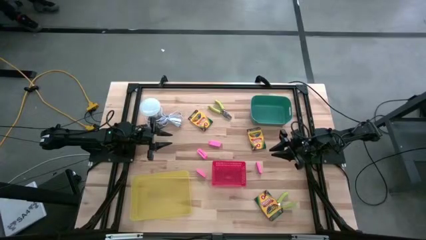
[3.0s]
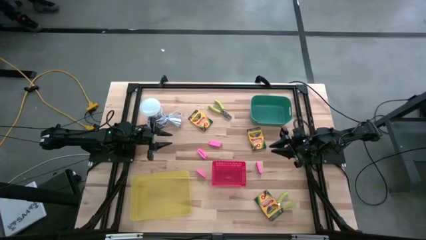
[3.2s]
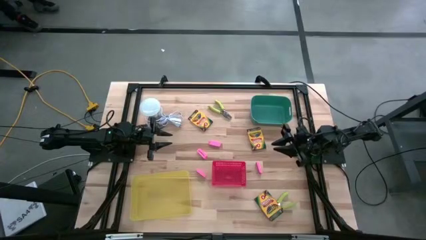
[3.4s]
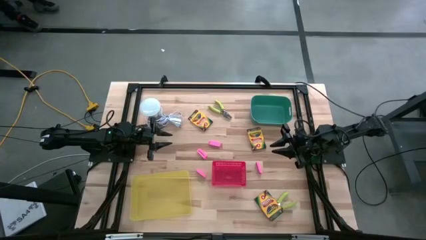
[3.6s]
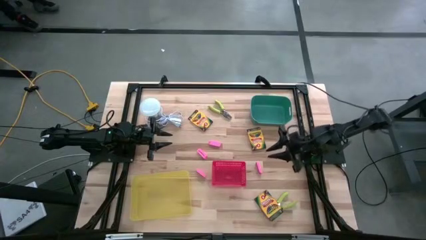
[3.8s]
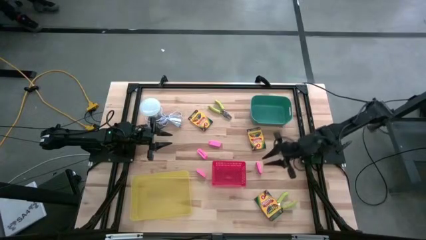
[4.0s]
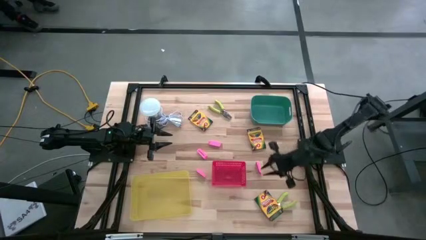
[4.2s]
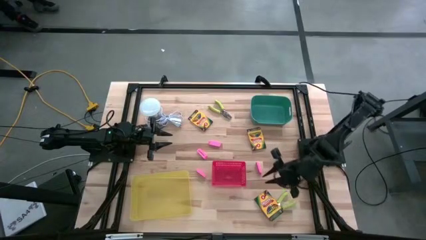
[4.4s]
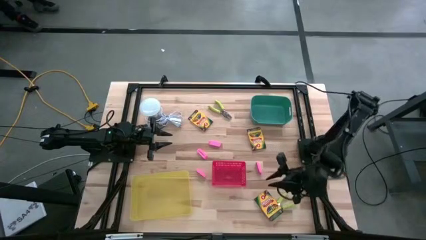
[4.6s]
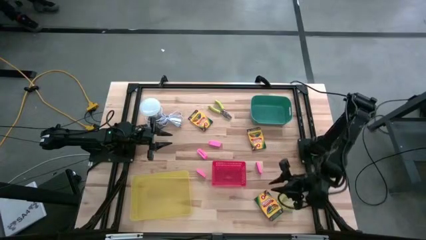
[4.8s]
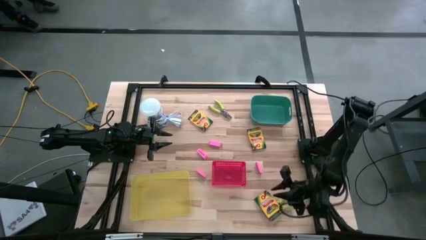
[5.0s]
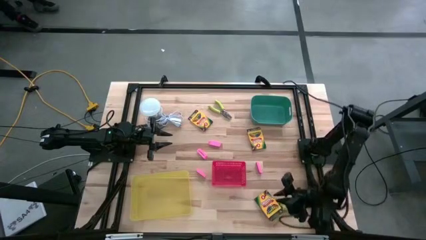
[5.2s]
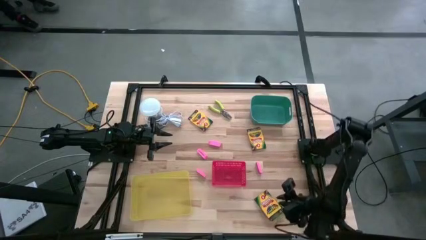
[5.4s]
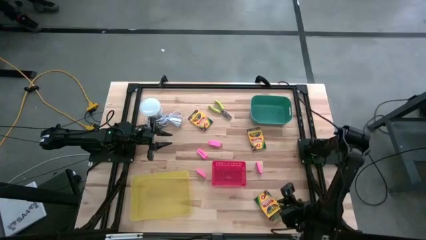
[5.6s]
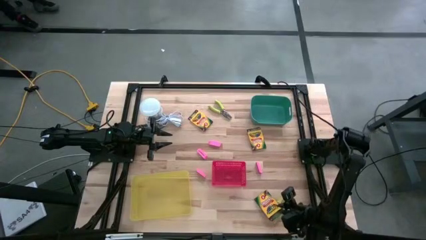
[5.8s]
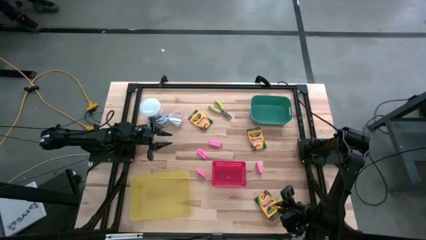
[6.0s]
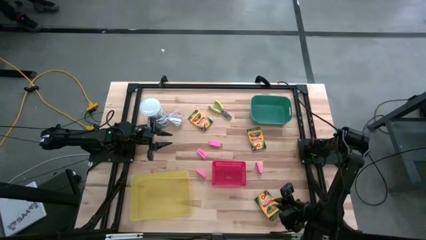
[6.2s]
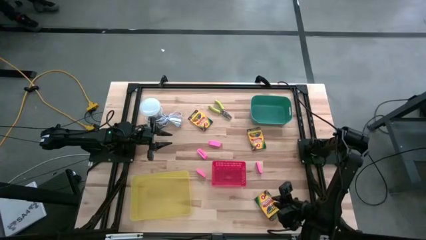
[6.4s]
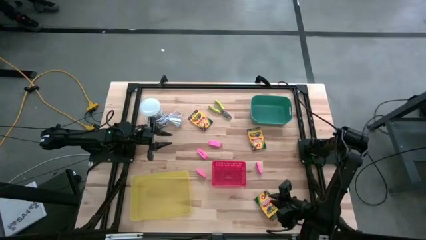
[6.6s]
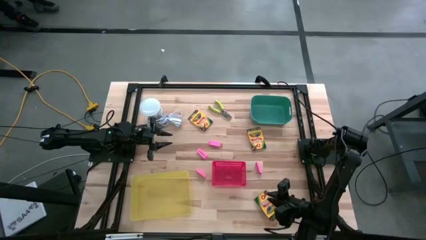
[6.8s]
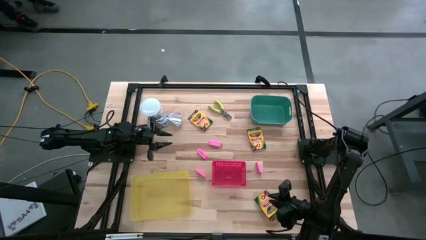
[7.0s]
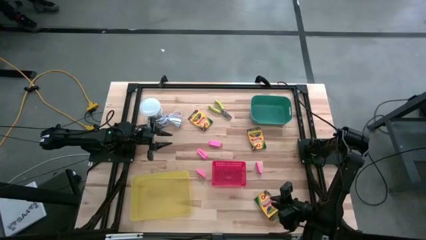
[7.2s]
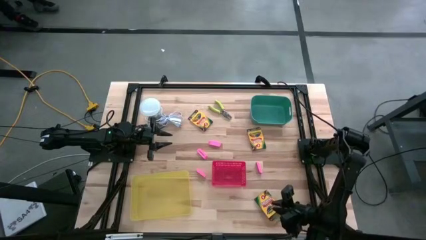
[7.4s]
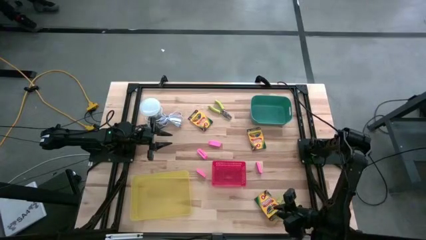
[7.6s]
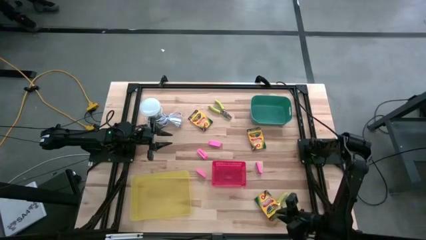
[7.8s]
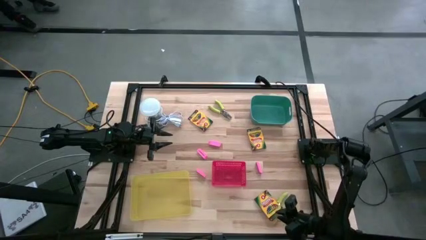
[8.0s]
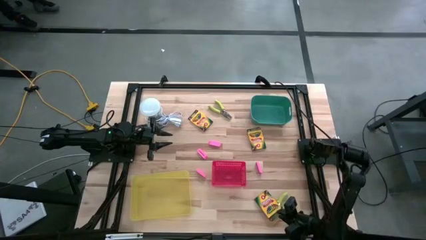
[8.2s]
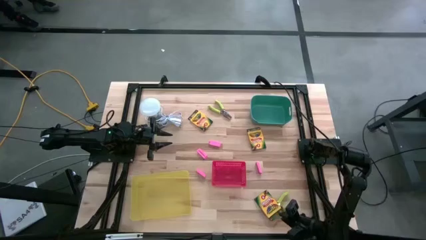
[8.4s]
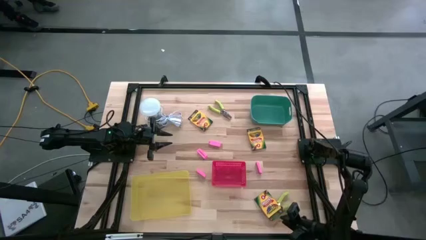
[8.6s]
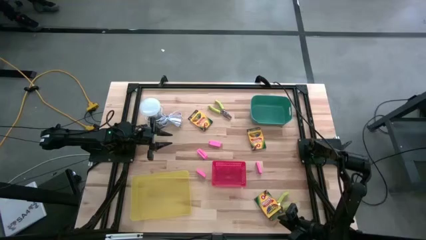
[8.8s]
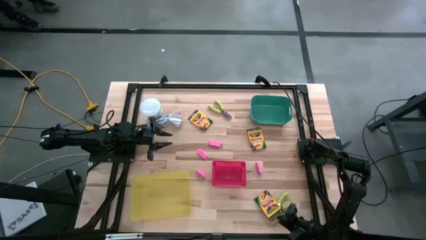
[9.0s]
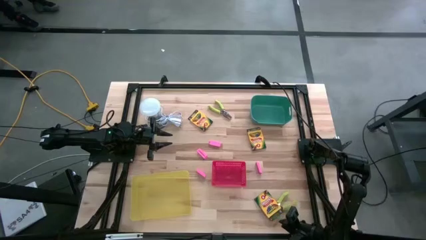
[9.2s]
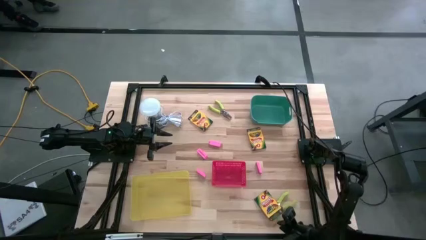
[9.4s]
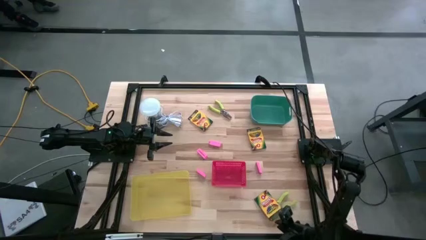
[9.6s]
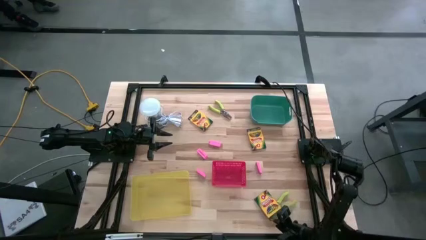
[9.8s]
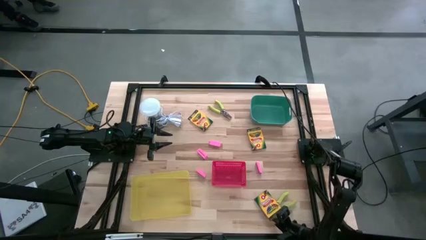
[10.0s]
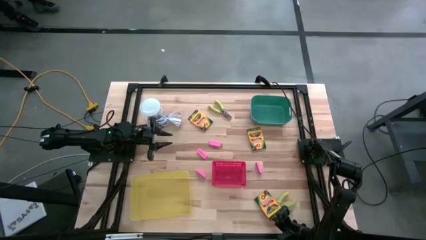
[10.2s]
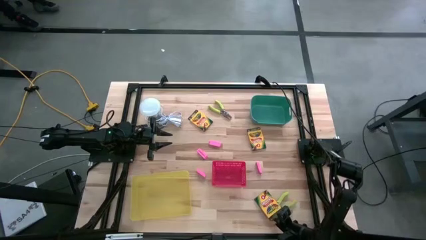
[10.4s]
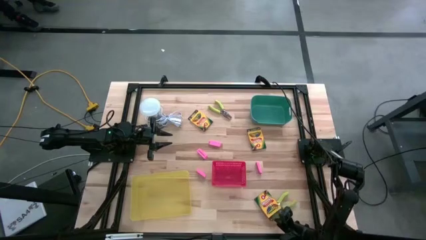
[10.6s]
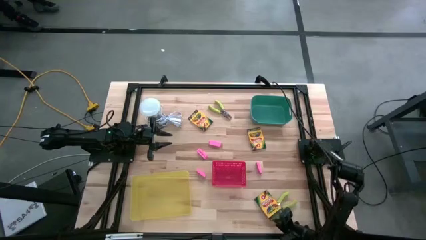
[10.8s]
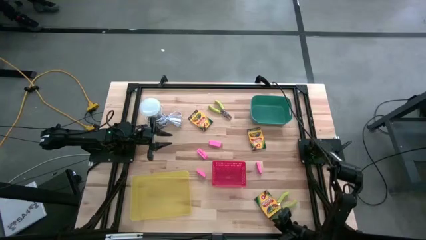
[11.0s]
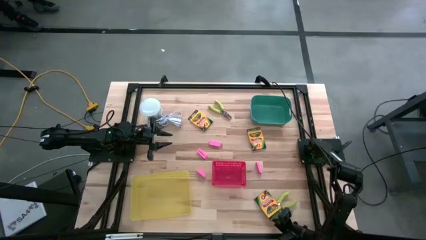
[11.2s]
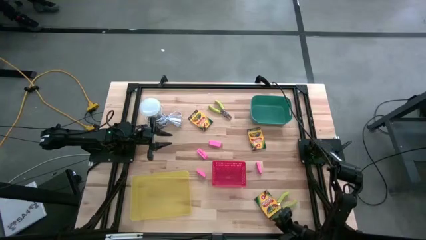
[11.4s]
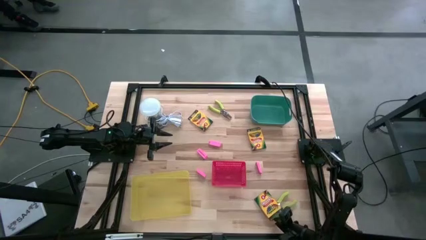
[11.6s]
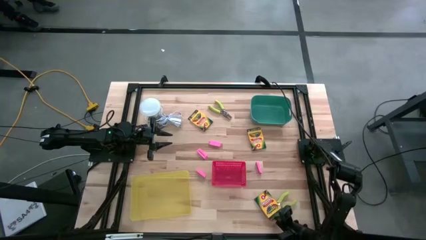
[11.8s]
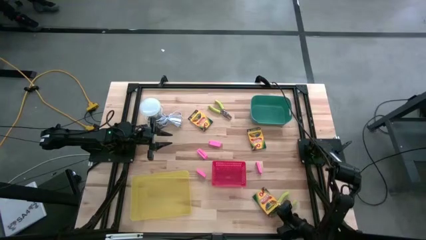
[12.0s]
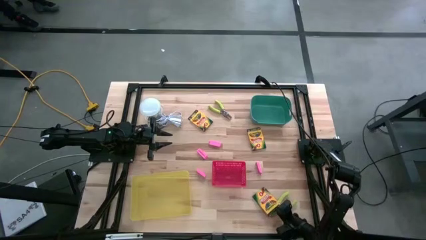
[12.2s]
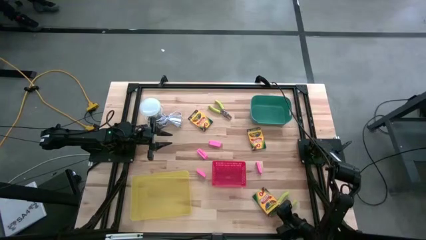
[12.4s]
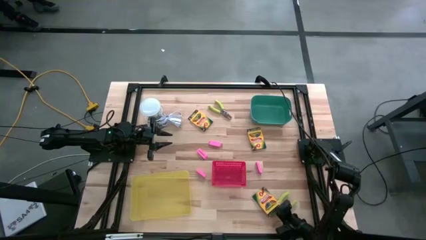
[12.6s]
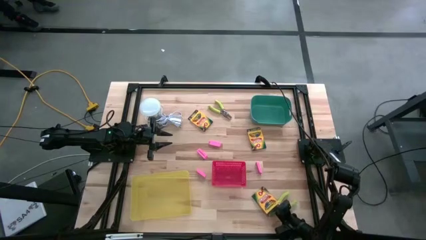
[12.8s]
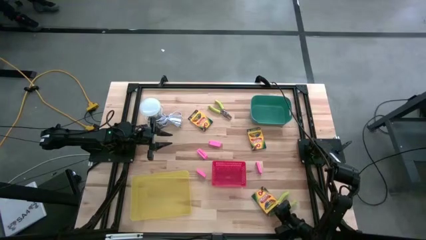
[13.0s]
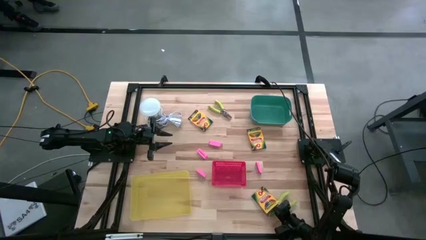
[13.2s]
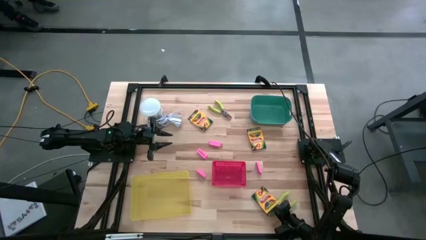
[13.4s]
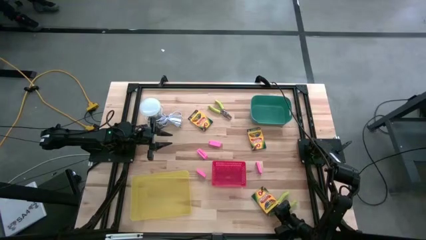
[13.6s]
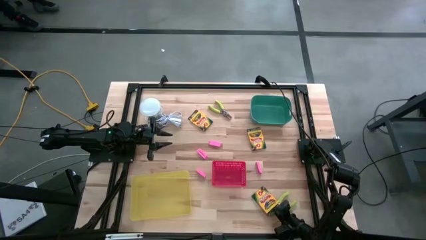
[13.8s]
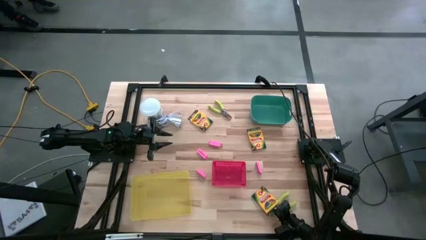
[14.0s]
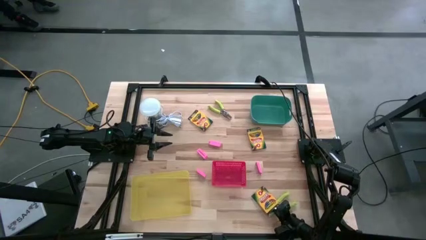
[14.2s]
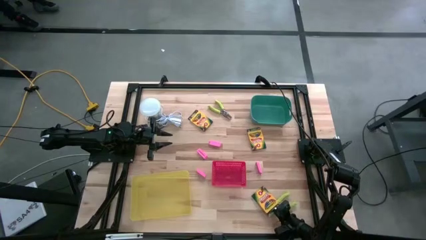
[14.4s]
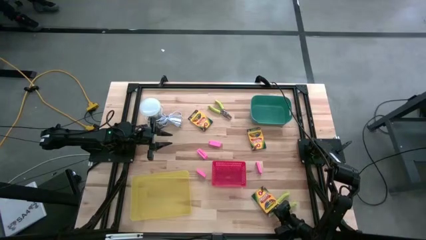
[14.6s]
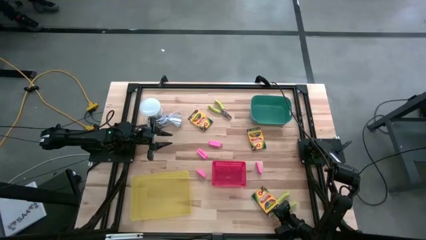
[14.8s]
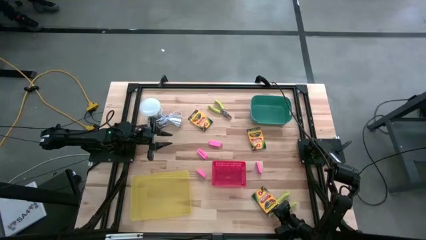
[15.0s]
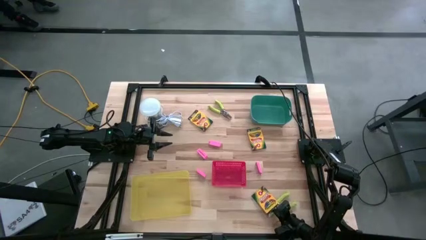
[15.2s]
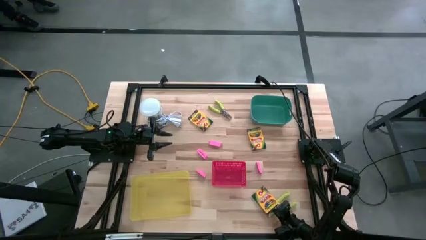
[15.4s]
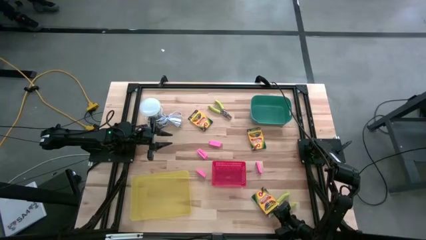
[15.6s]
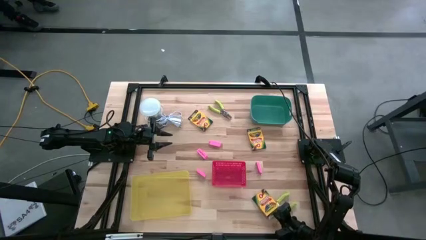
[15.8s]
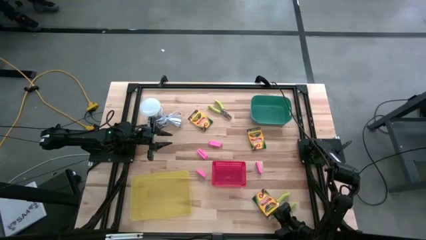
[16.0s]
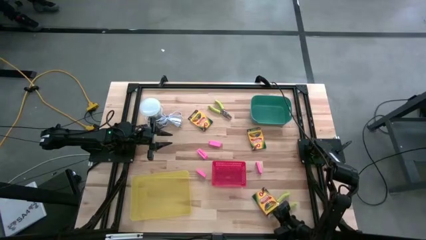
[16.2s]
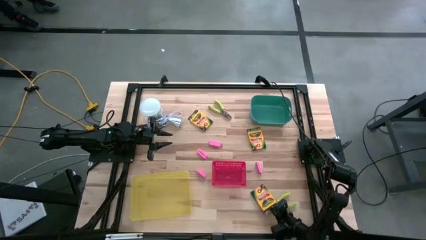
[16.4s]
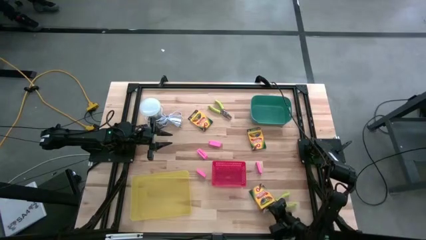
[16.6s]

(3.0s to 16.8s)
Task: Pick & Place School Supplies
Put the bottom yellow crayon box into the yellow bin
